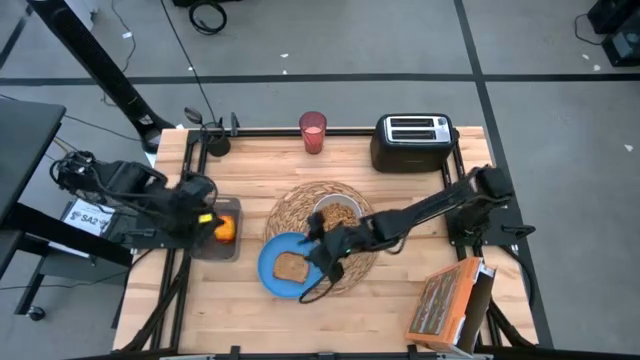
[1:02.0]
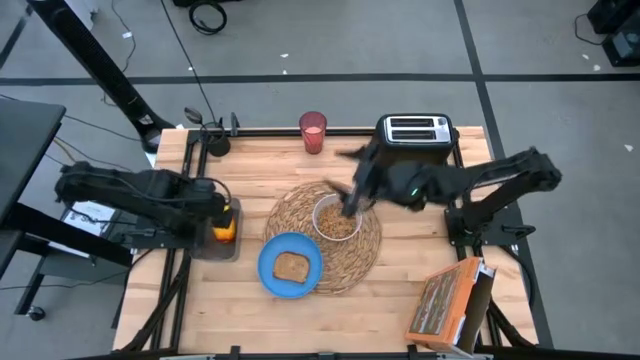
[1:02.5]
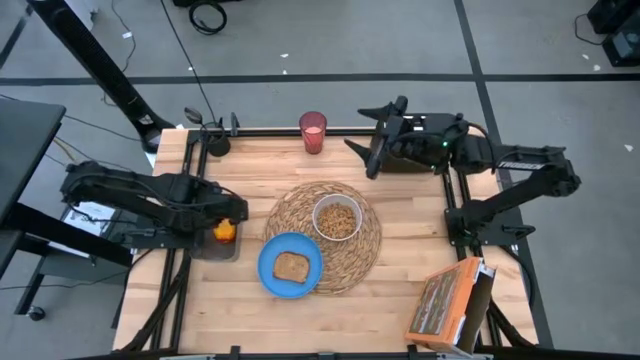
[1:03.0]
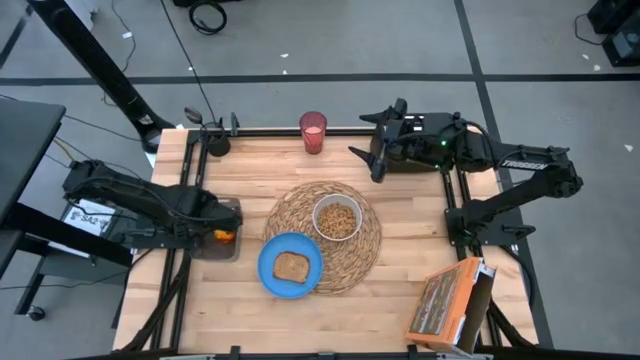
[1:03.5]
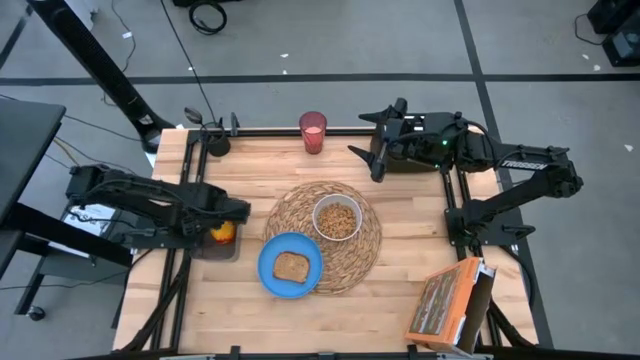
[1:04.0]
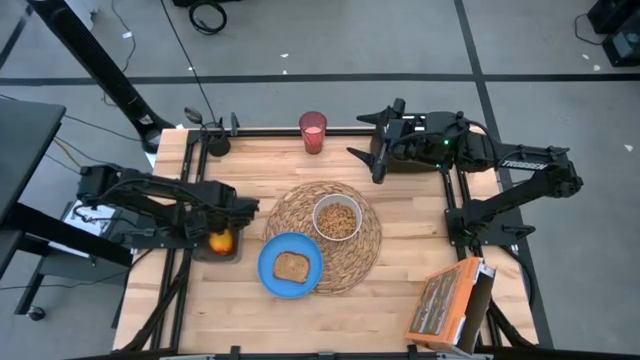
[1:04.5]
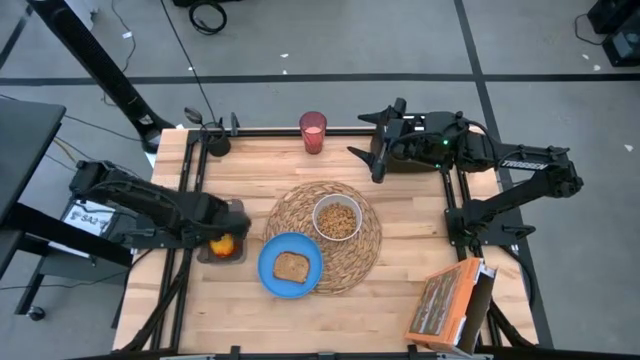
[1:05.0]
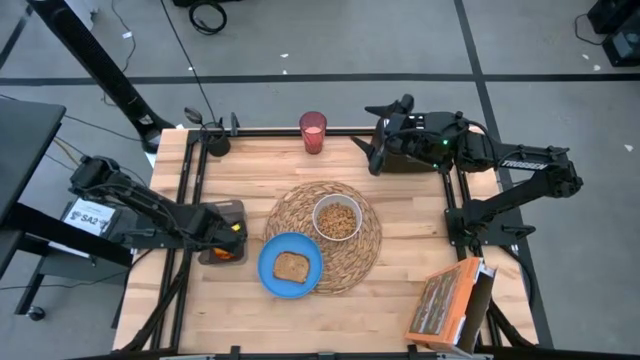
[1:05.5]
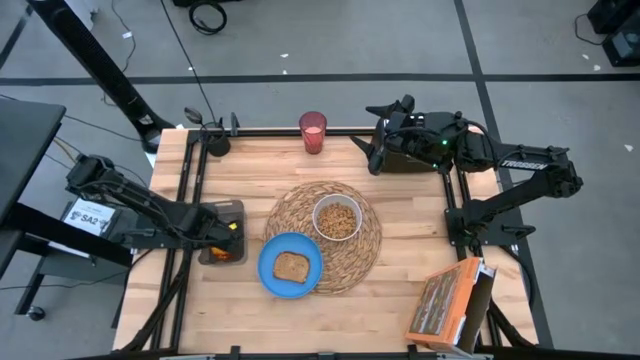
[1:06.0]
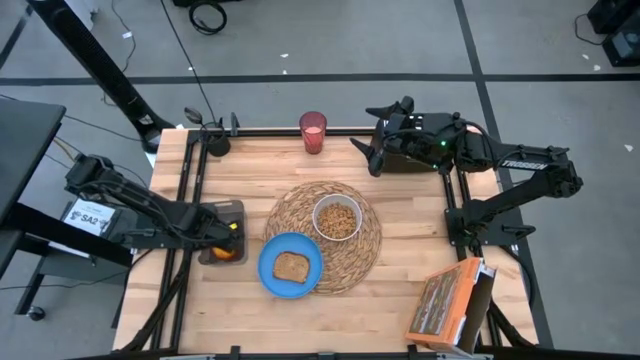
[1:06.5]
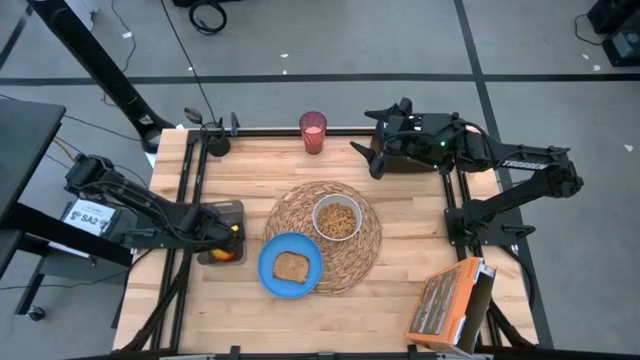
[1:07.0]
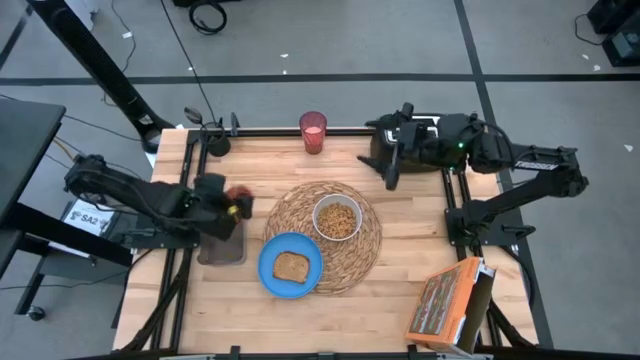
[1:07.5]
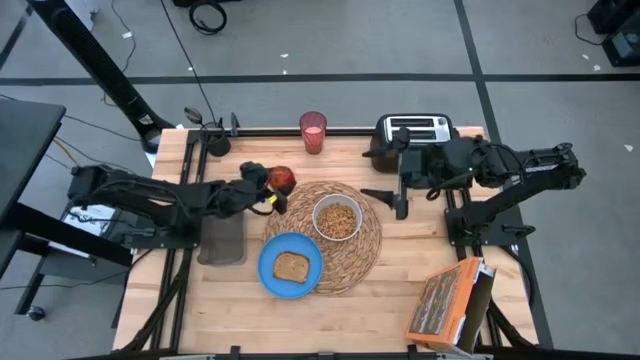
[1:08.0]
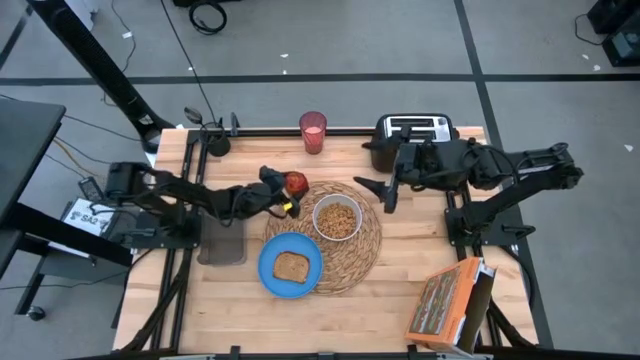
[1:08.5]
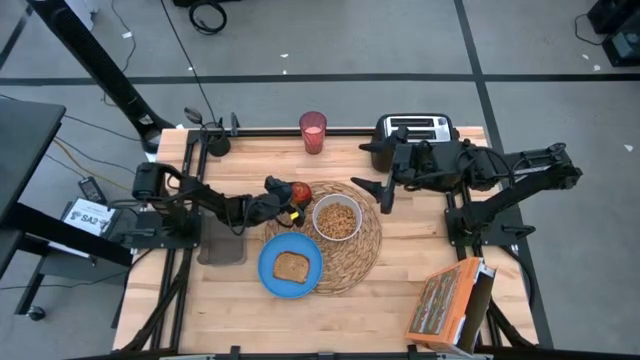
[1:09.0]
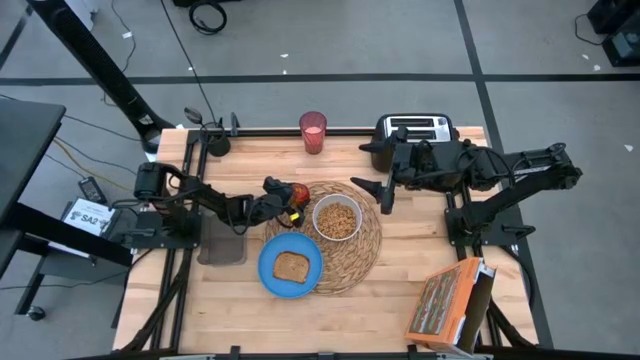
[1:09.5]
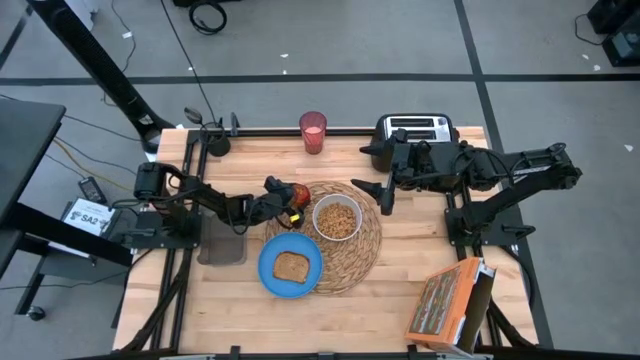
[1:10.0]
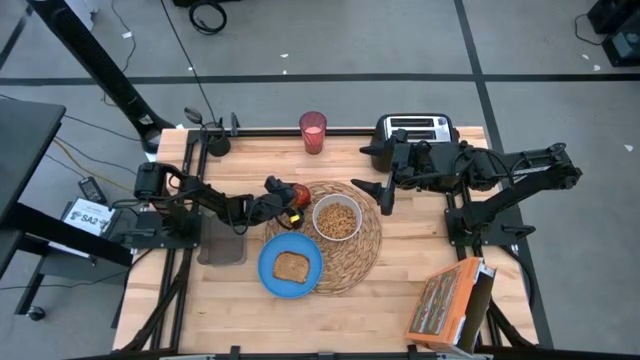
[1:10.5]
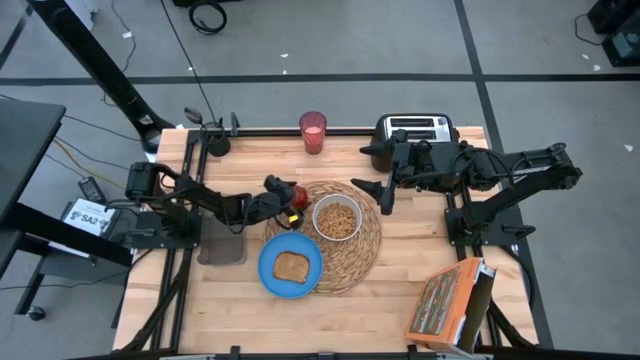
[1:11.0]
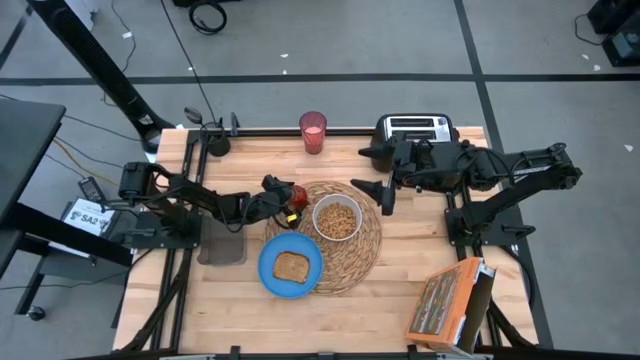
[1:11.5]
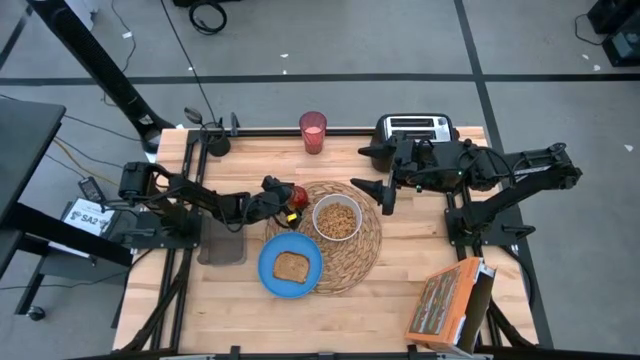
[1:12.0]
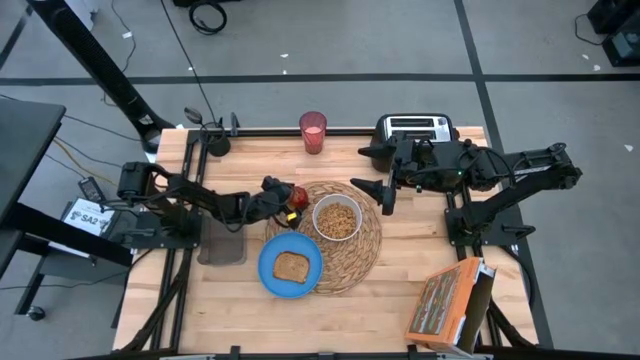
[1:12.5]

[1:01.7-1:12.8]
Task: Arrange a breakfast setting
Put the red apple on the brown table mat

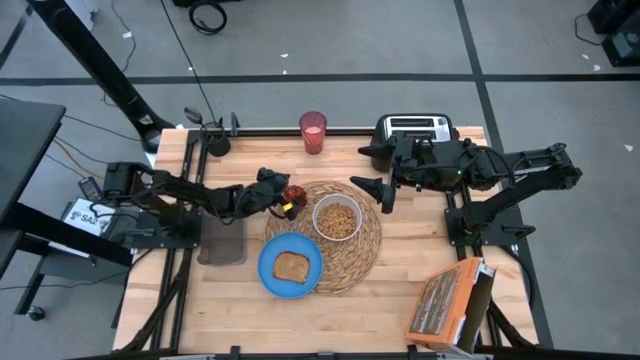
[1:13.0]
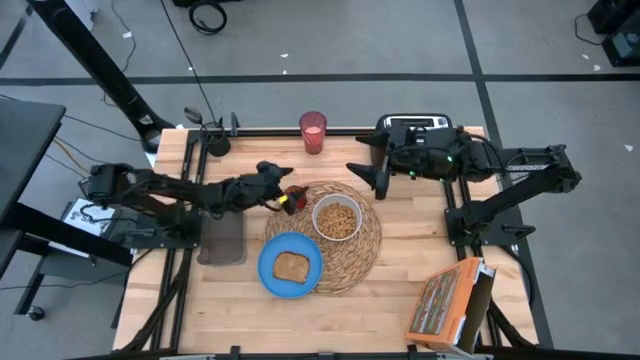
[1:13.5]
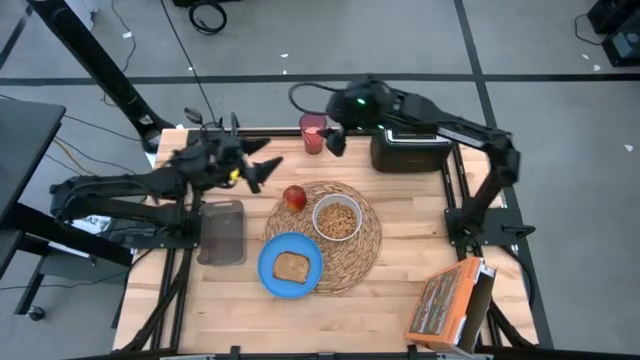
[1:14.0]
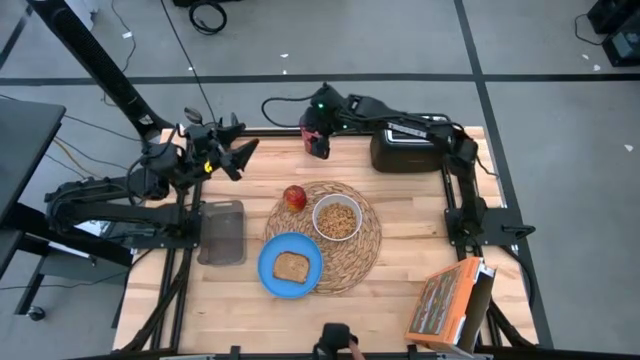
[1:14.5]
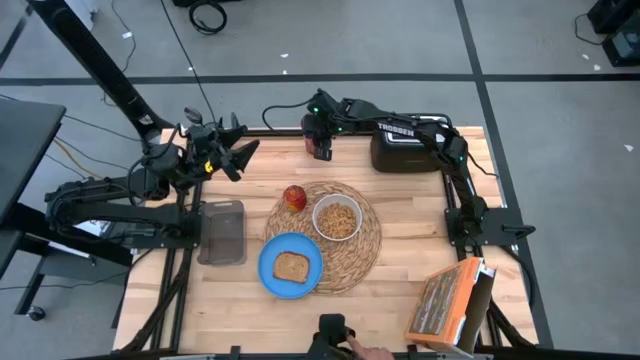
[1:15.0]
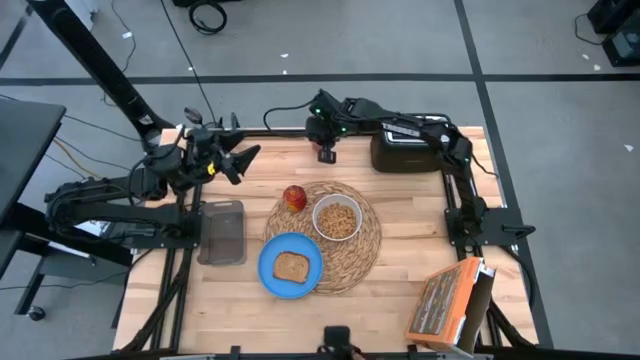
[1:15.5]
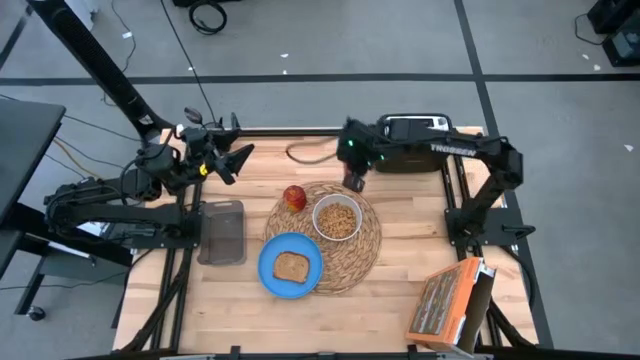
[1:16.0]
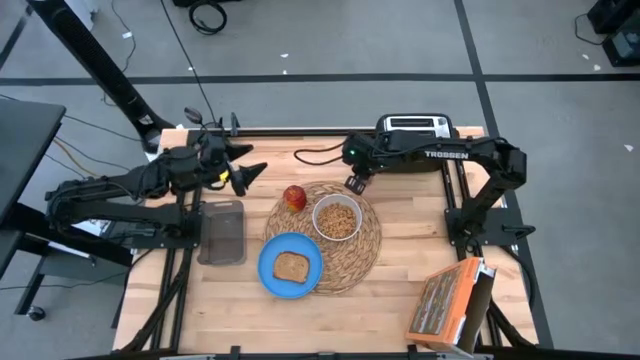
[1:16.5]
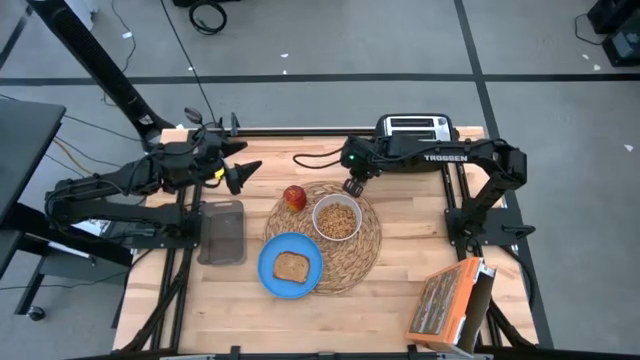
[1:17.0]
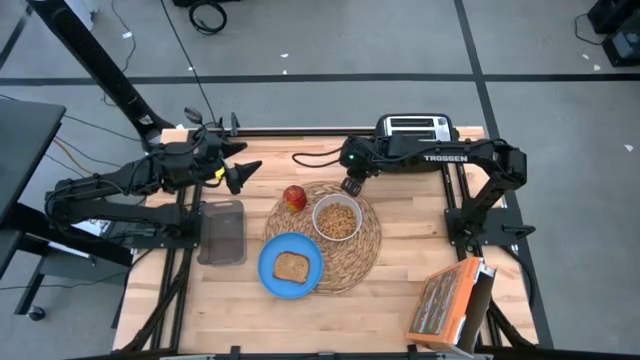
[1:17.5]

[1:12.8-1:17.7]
Put the red cup on the brown table mat

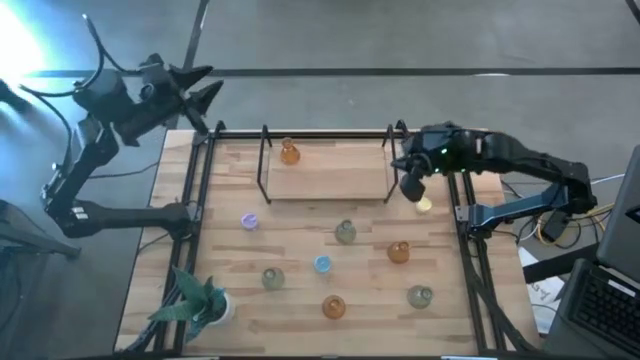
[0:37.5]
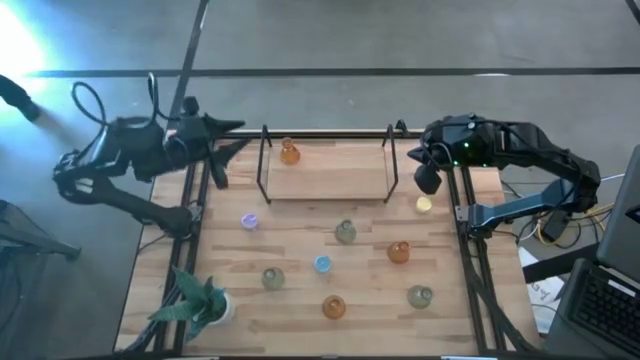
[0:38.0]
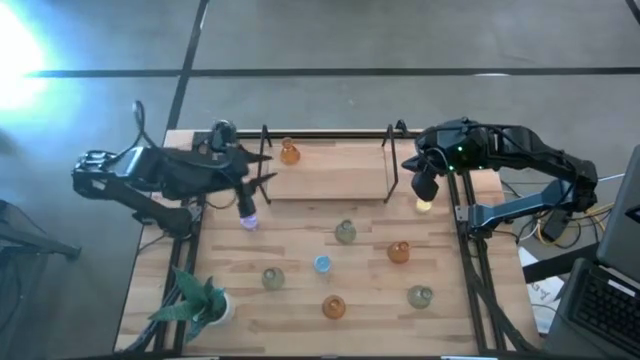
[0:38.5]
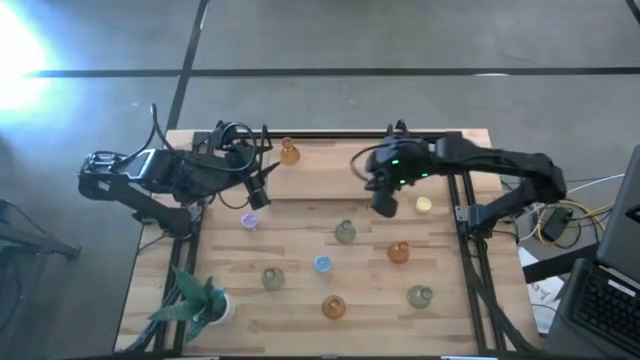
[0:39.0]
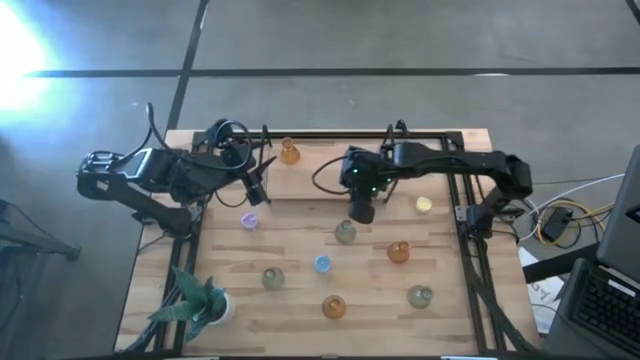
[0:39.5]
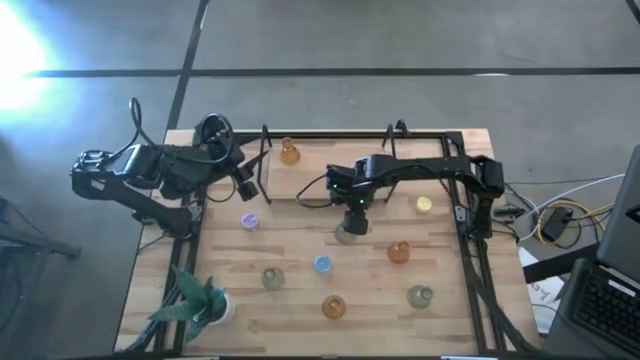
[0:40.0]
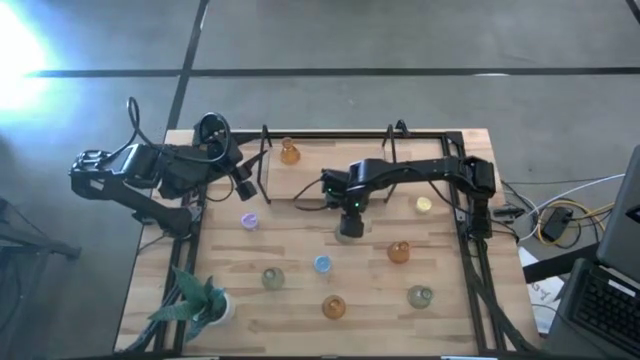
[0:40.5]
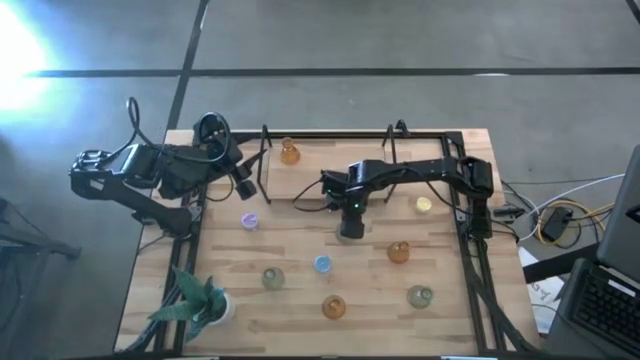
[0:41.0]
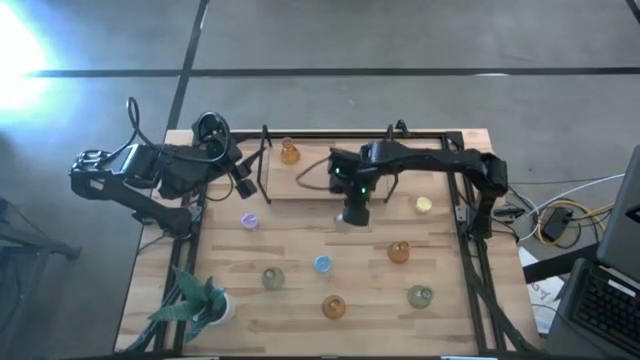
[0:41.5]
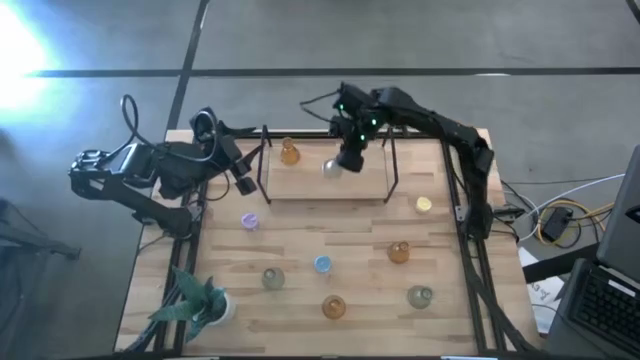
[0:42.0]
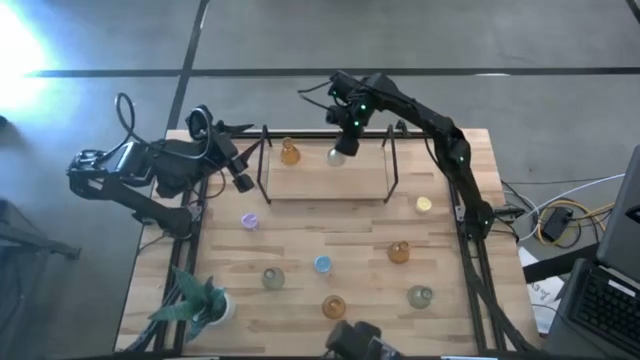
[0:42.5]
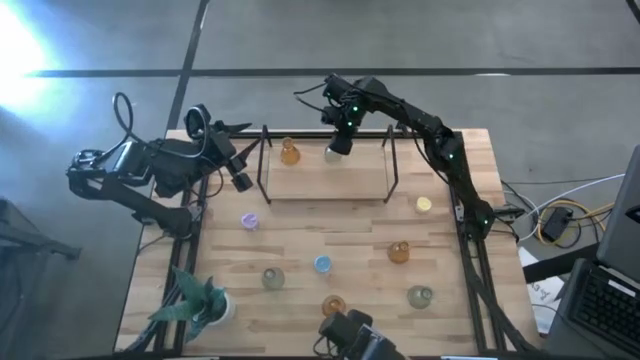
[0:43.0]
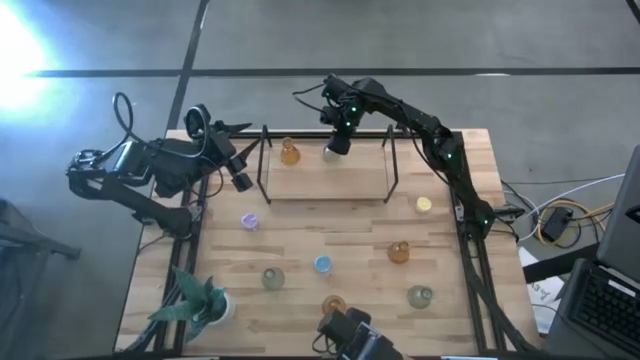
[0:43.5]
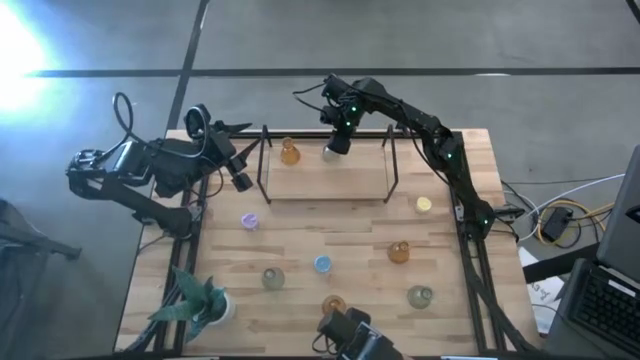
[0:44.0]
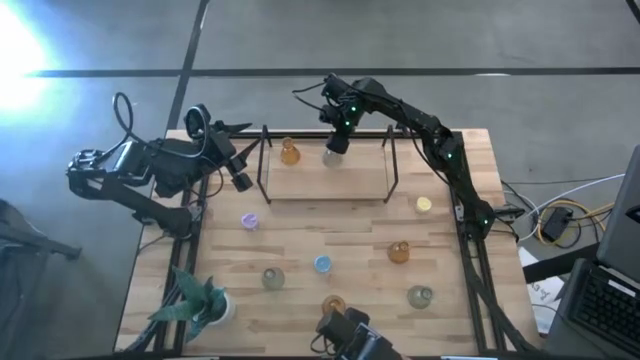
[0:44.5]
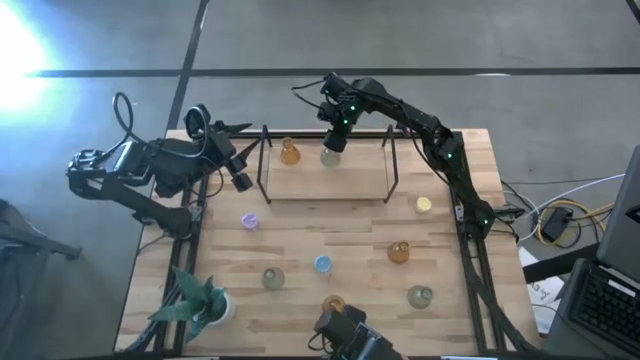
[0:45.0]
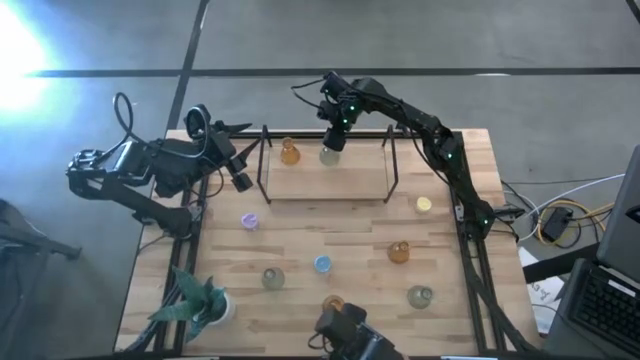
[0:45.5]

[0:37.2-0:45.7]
Task: Pick & Place candle stick holders
Put the top middle green glass candle holder on the shelf
